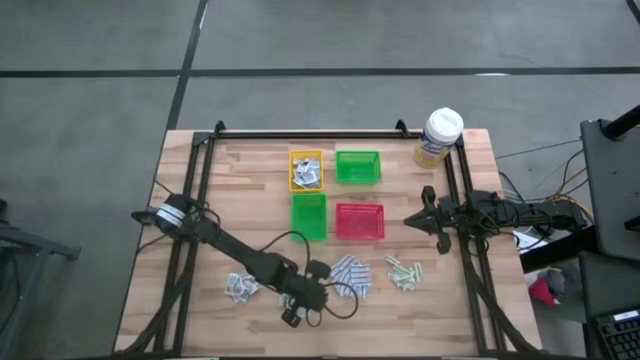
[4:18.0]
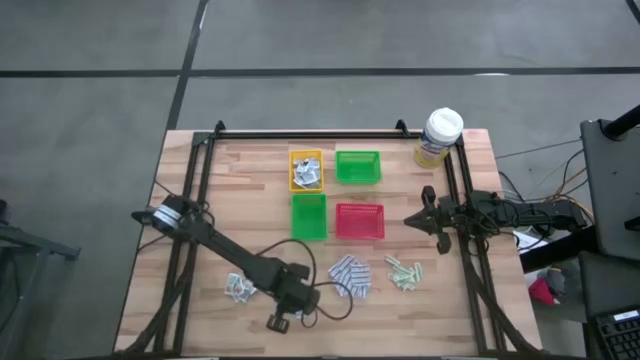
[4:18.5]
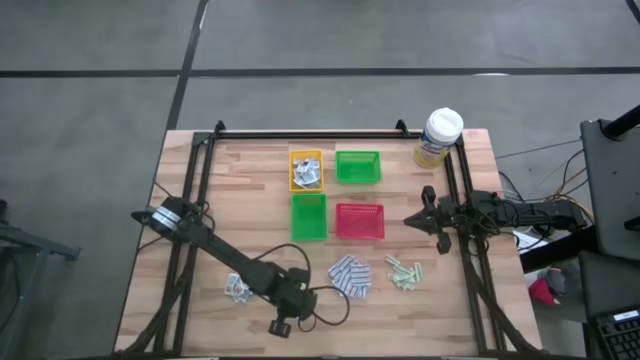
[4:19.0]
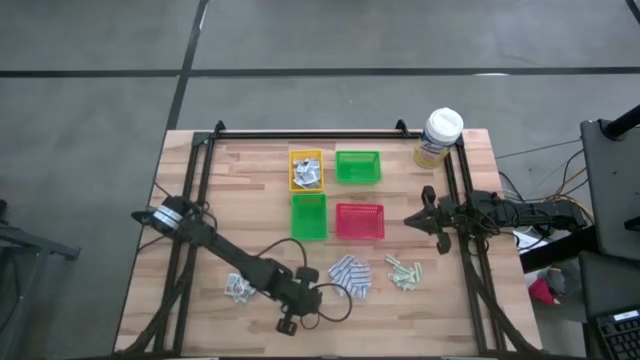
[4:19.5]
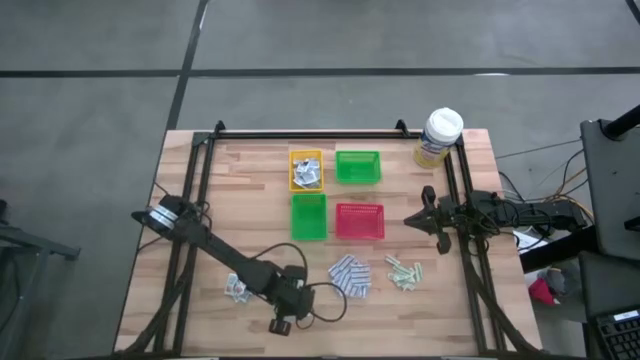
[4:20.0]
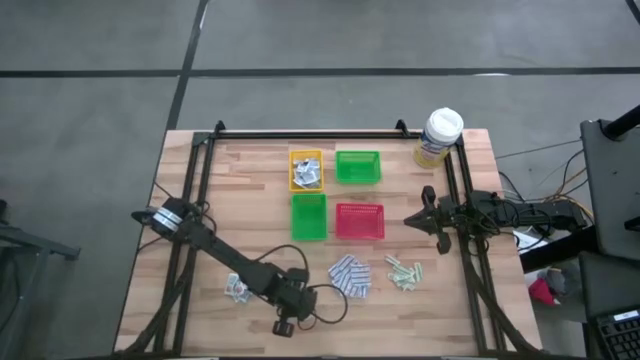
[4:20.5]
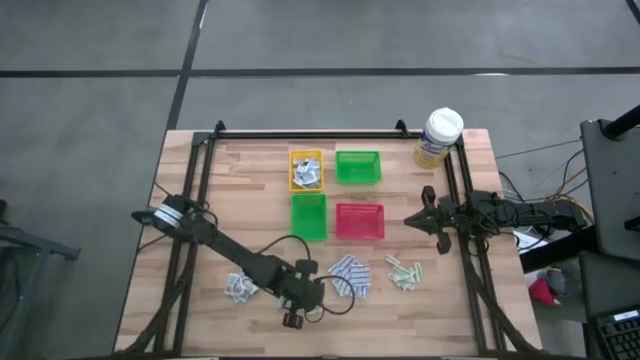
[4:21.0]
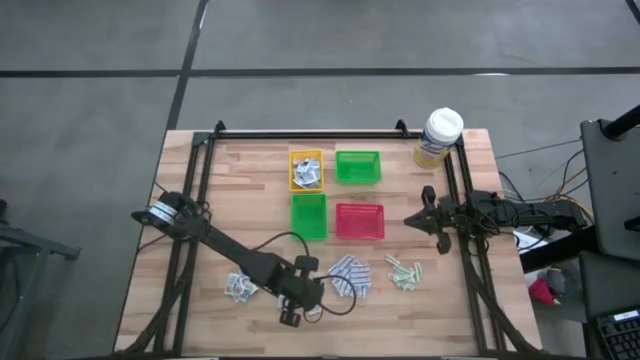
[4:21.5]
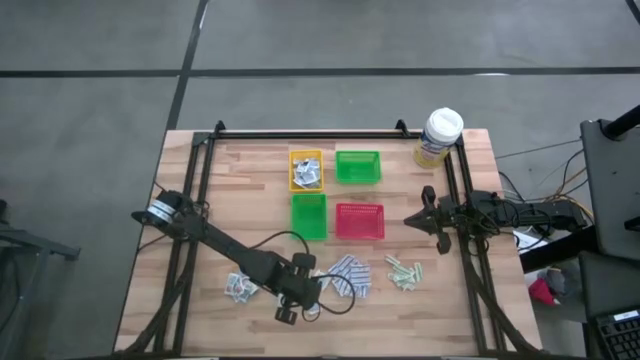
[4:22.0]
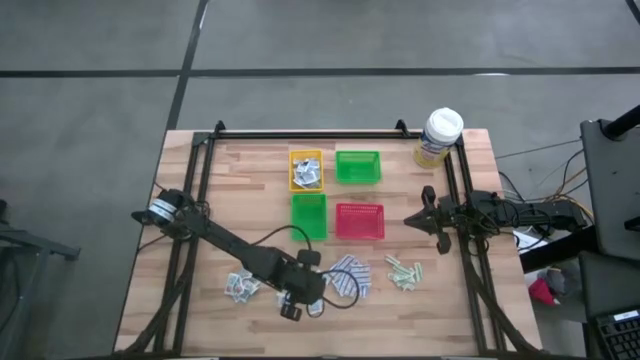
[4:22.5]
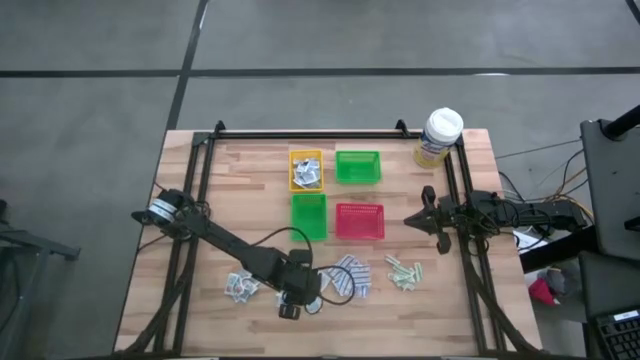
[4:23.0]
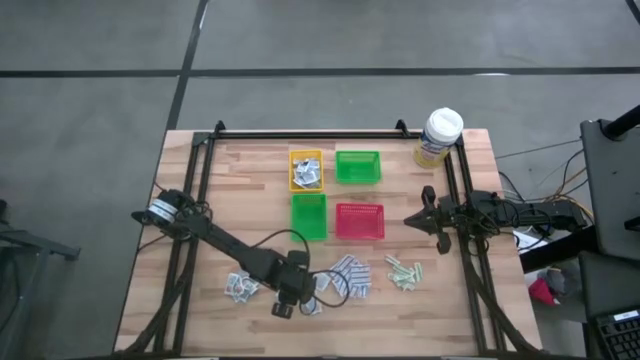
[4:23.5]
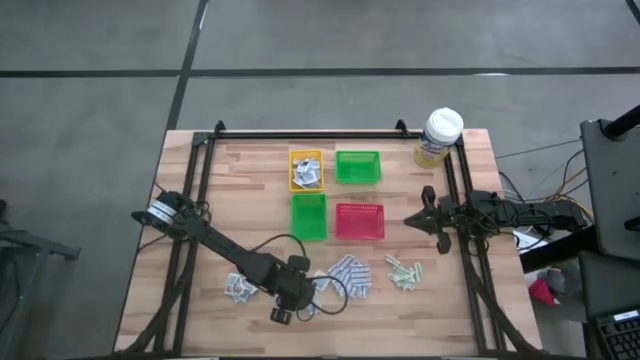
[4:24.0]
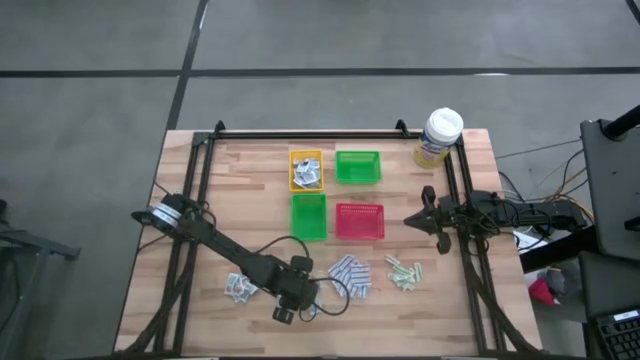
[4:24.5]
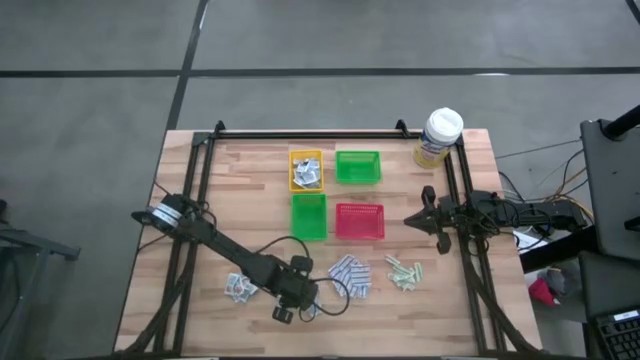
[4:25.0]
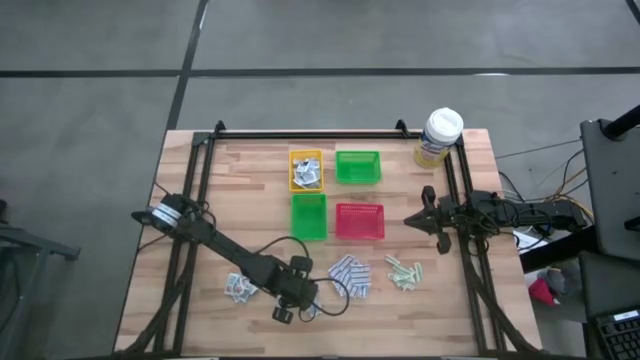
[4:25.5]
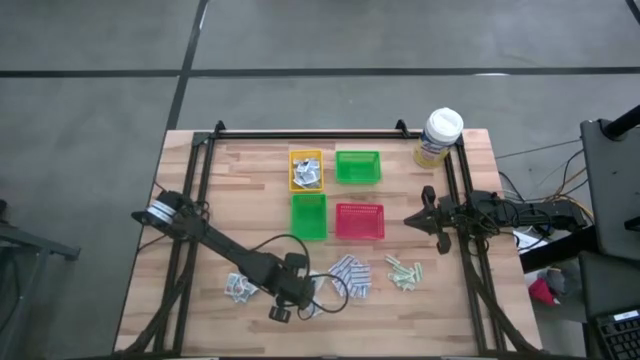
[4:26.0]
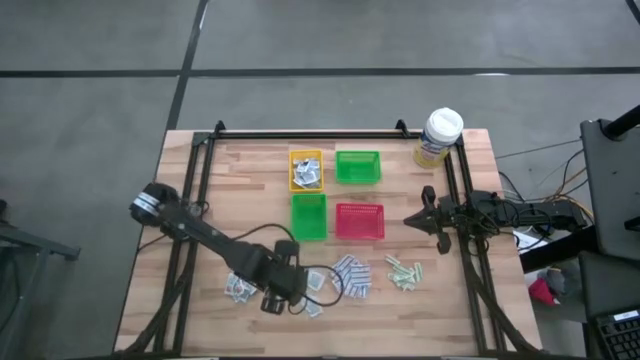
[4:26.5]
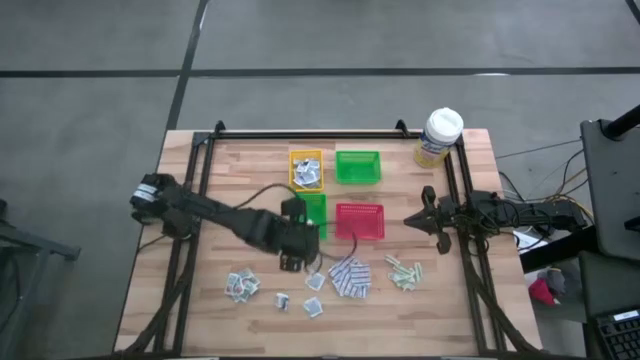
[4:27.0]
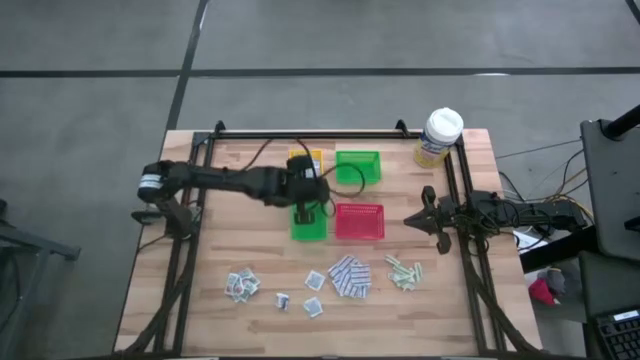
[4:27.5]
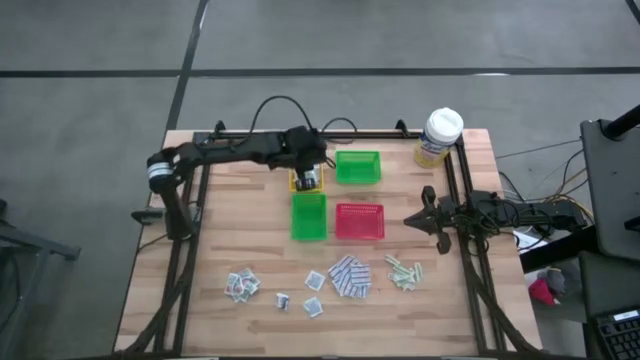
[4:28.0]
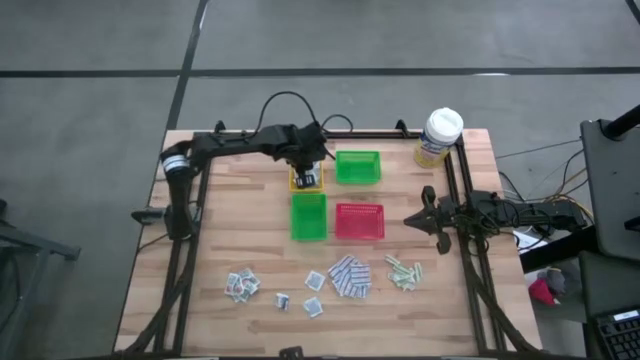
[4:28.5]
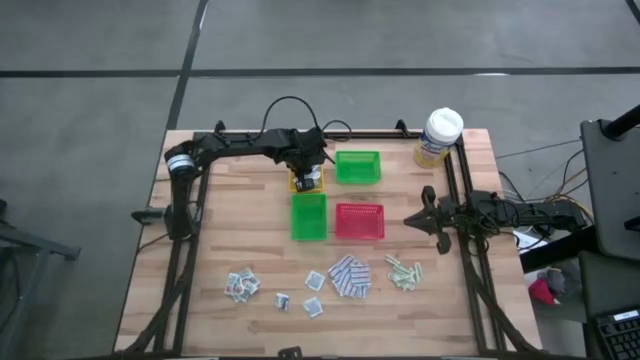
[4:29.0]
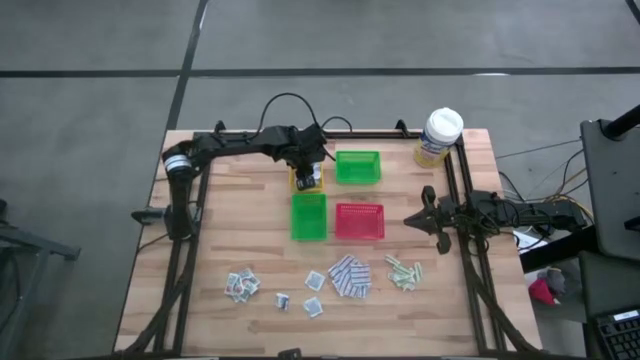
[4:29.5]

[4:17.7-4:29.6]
Task: Pick & Place First Aid Supplies
Put the blue alcohol pad into the yellow bin

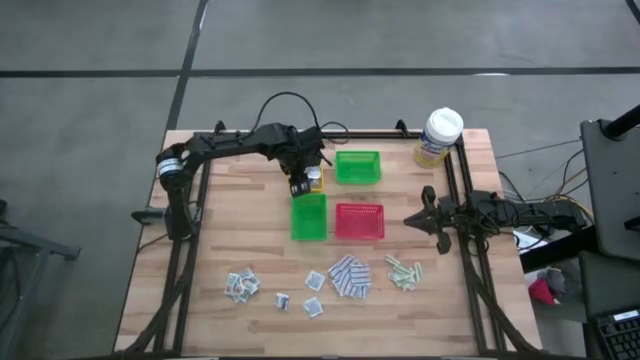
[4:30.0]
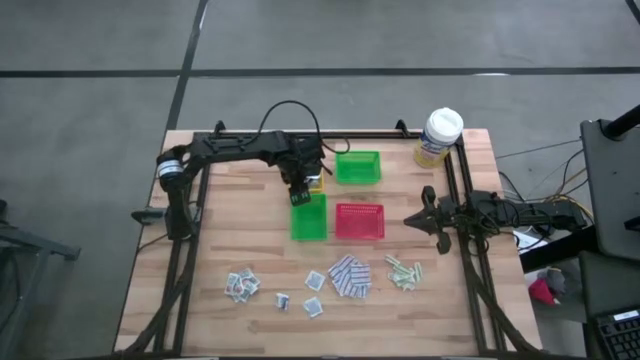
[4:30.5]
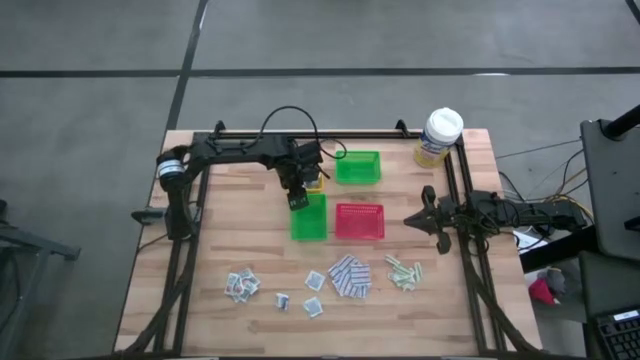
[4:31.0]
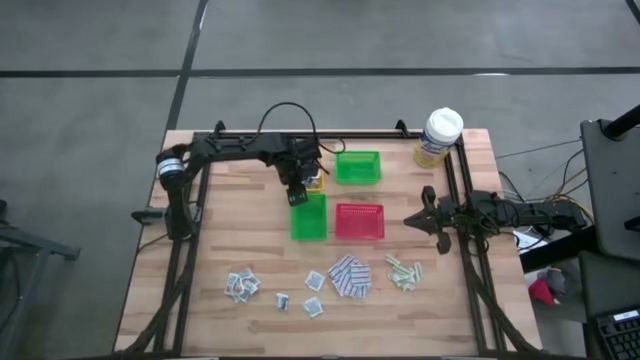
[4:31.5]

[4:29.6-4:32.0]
Adjust the blue alcohol pad in the yellow bin

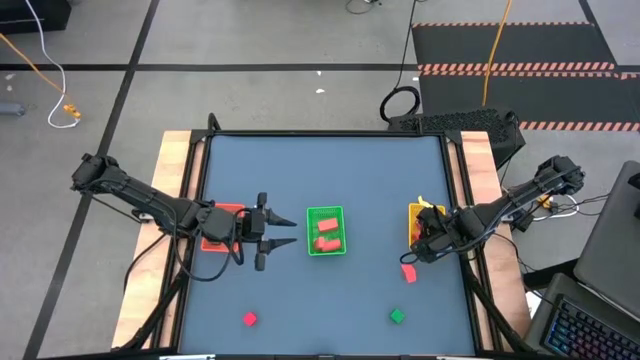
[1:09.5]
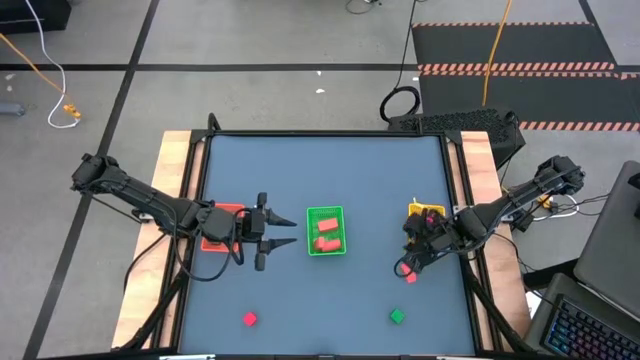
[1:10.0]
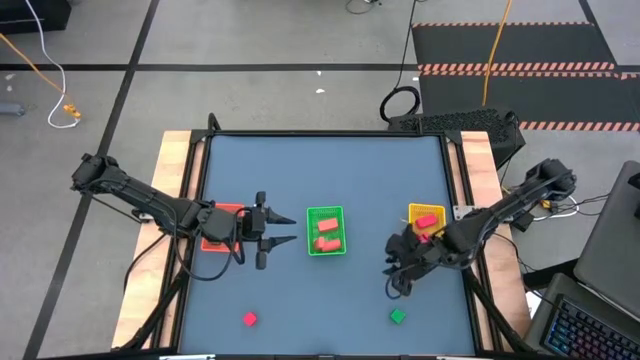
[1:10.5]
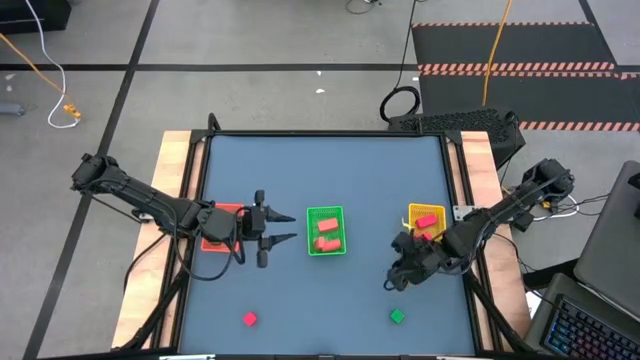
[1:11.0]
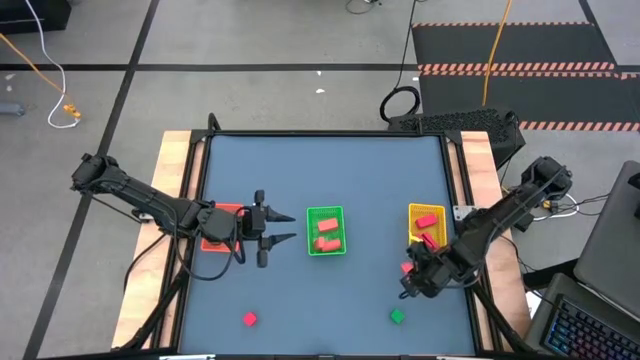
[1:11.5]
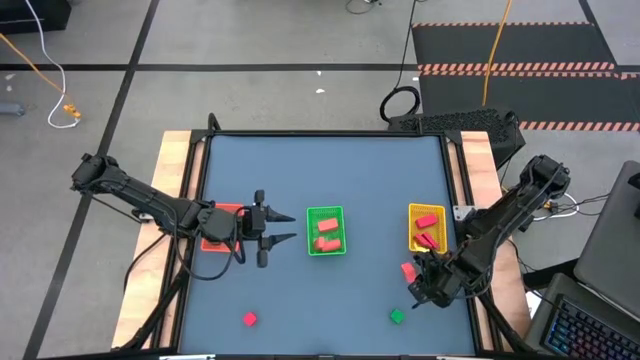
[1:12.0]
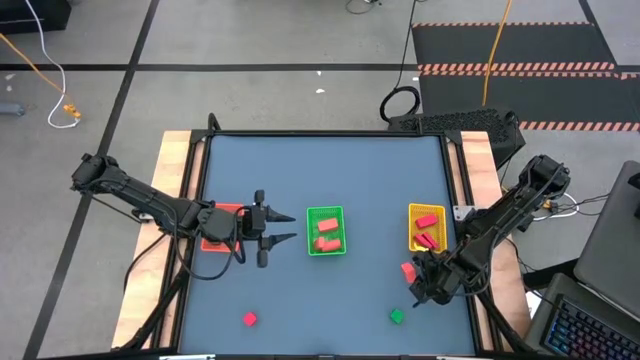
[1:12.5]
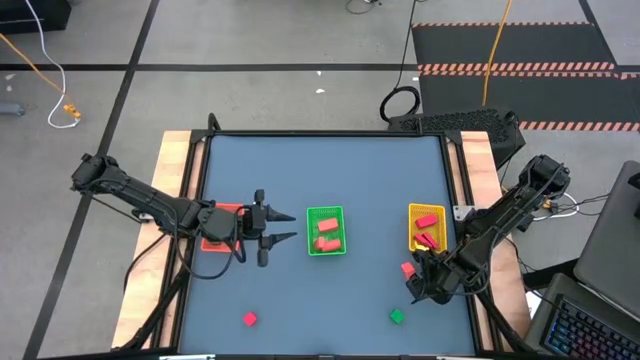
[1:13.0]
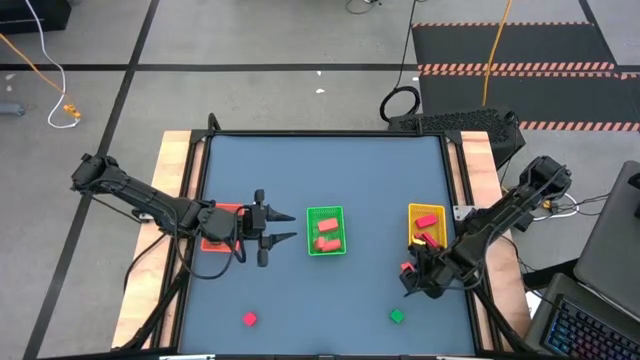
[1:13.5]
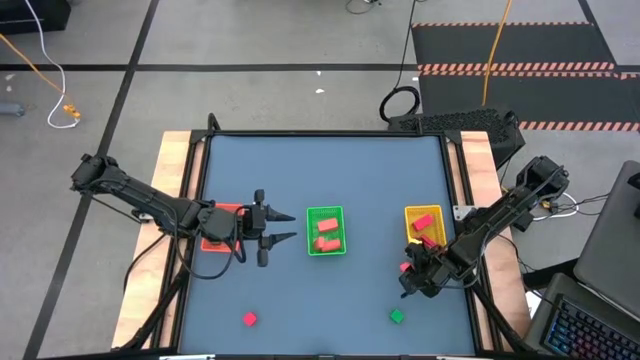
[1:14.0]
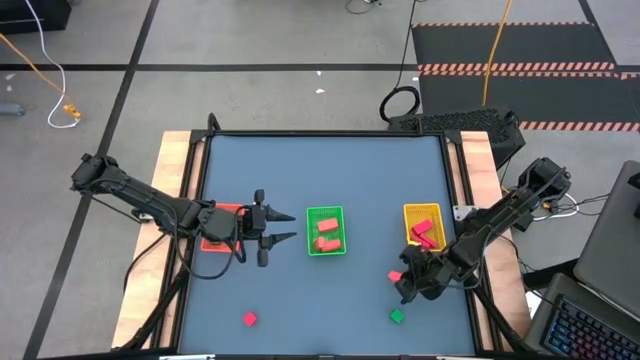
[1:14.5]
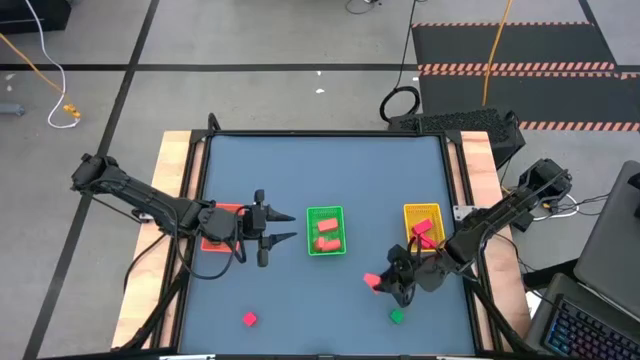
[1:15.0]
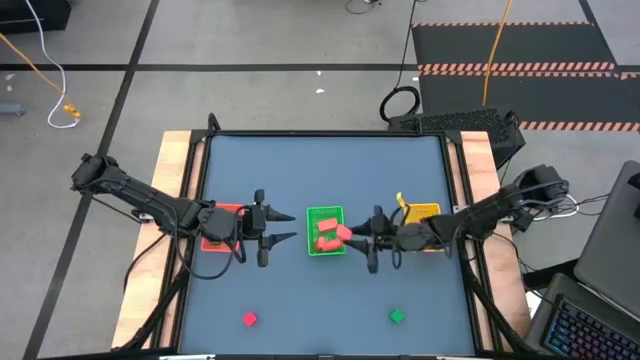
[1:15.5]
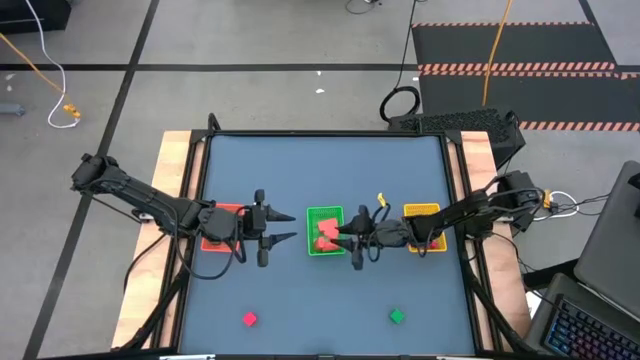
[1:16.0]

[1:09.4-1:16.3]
Task: Sort & place blocks by color
Put the orange block into the green bin
